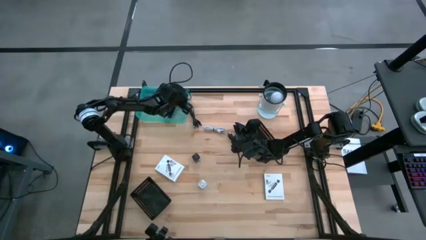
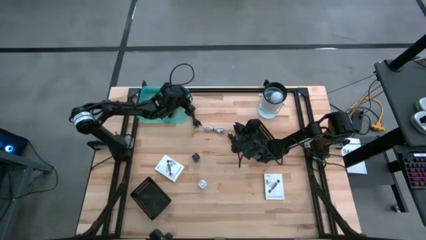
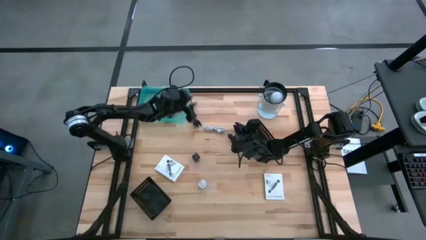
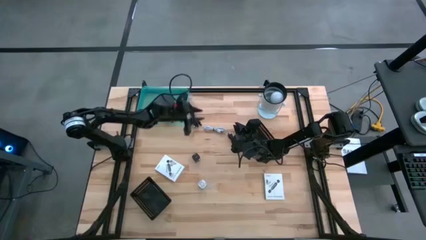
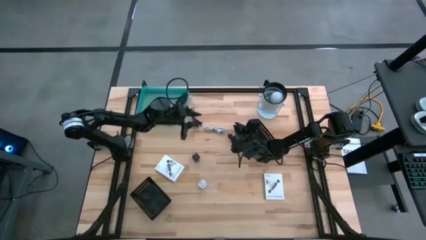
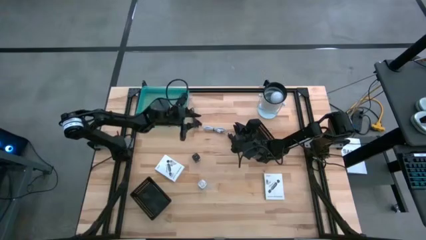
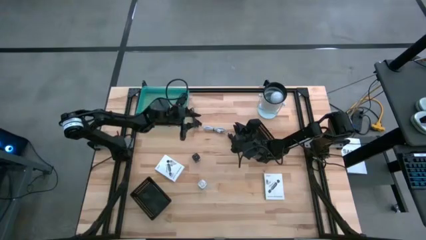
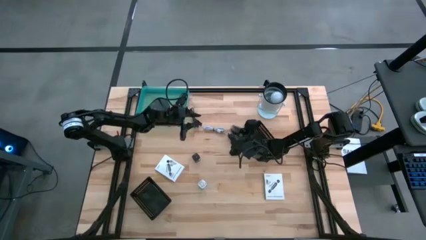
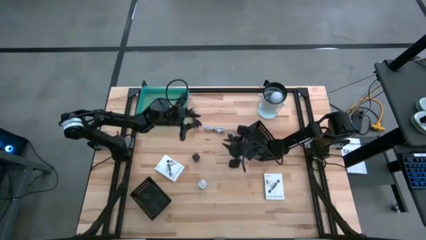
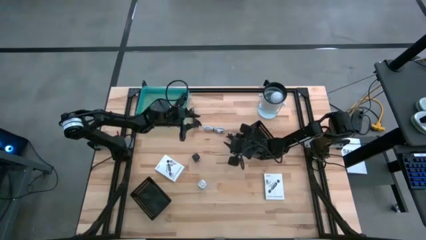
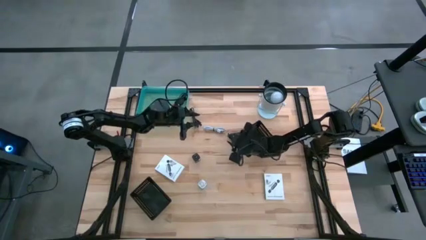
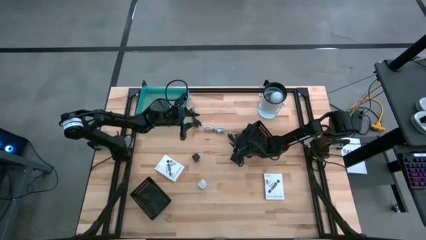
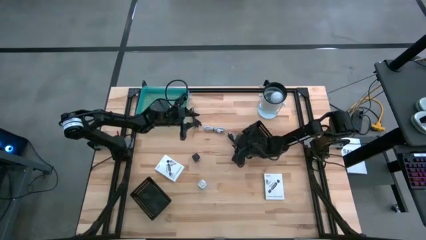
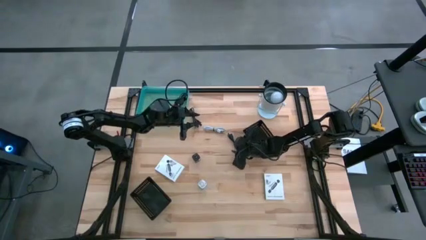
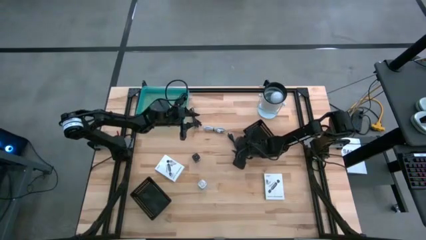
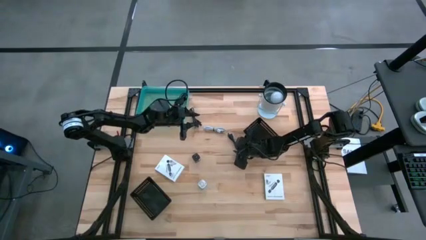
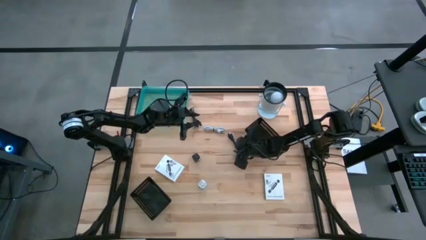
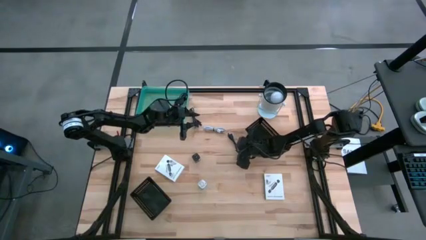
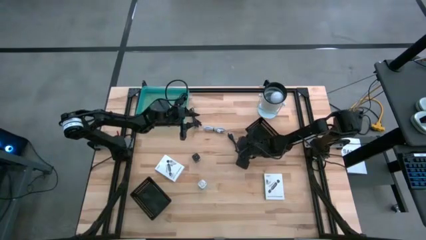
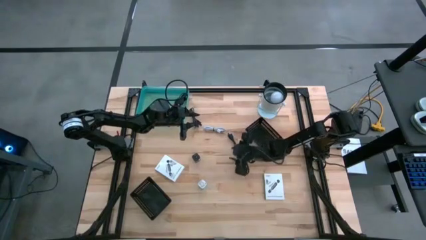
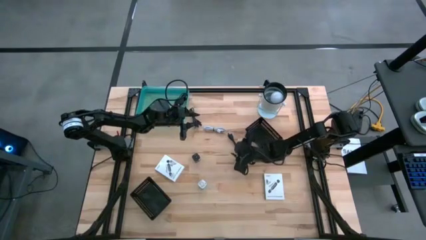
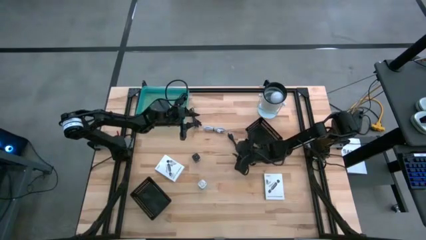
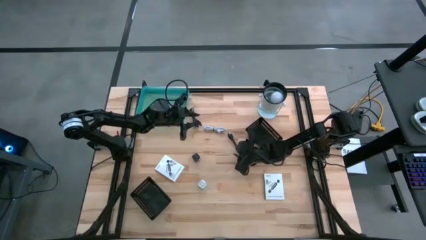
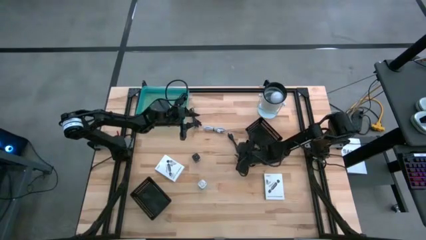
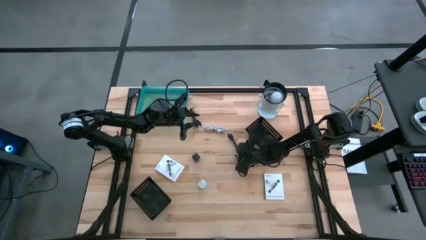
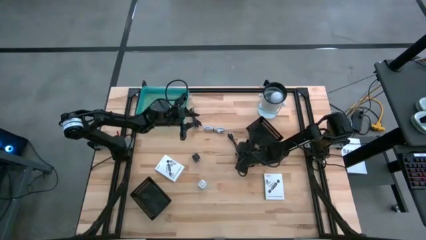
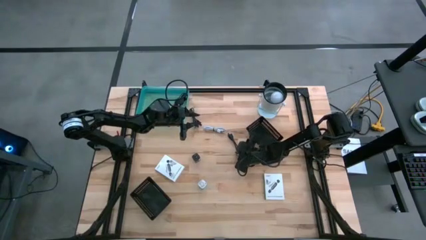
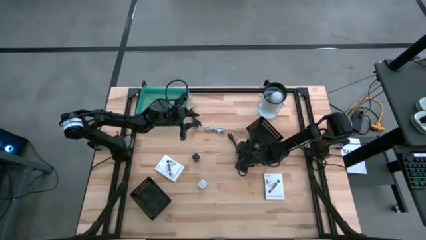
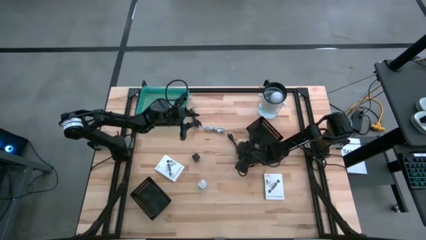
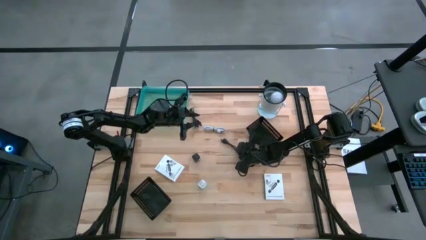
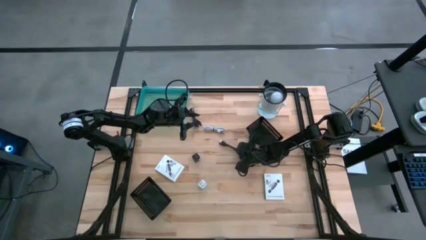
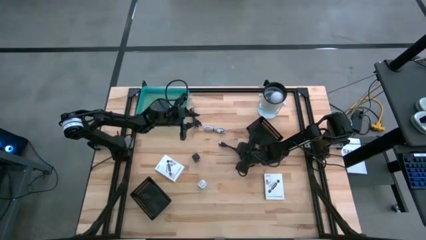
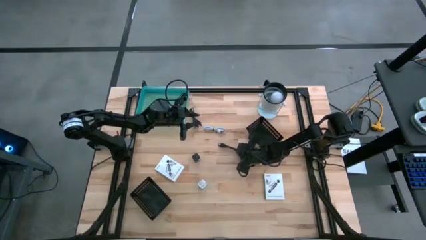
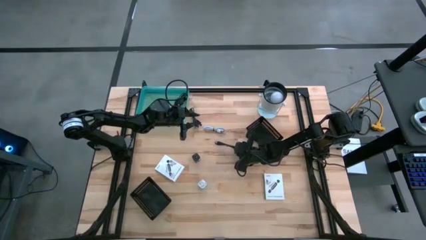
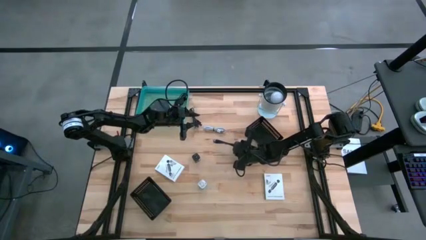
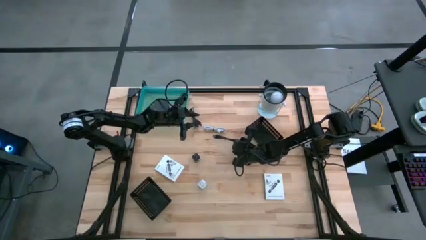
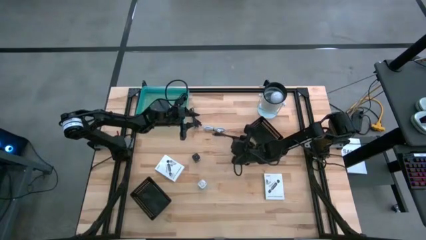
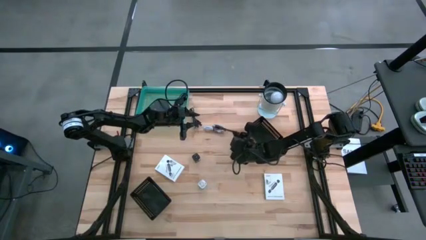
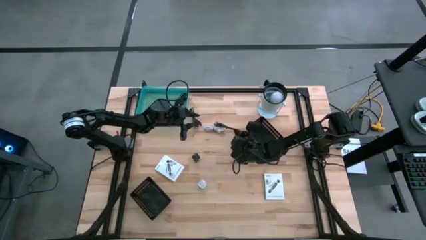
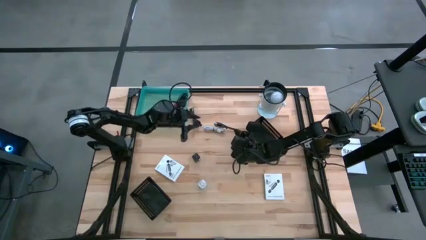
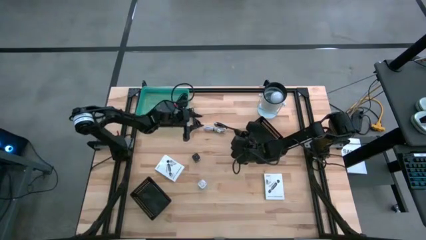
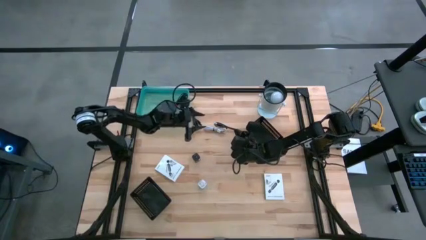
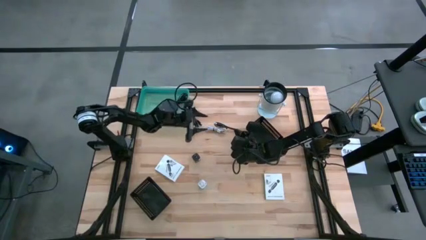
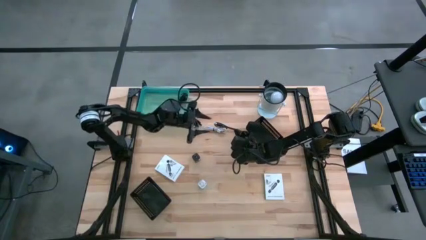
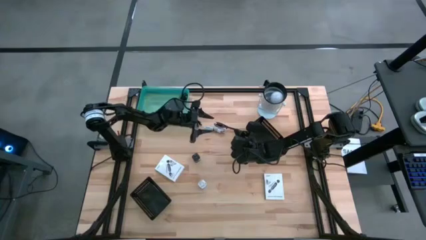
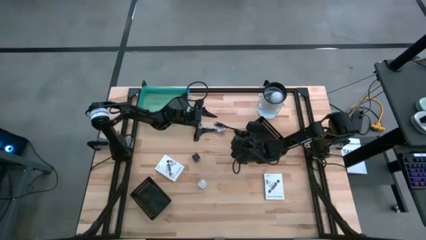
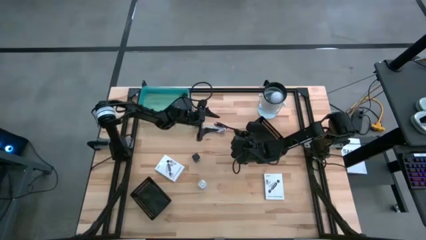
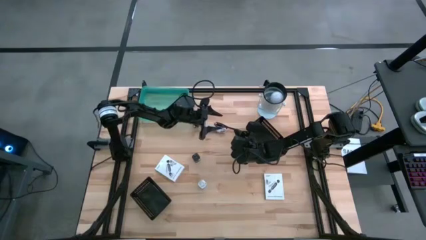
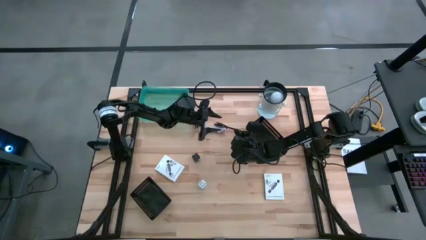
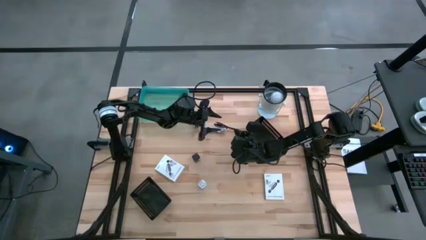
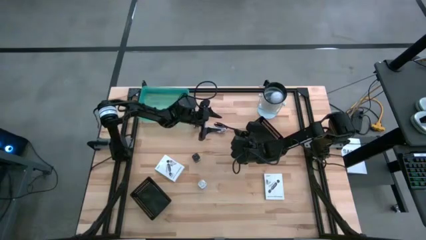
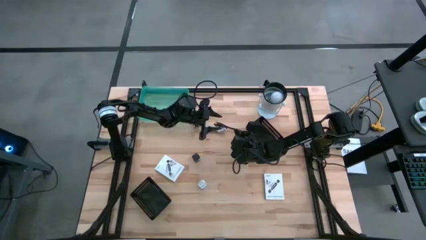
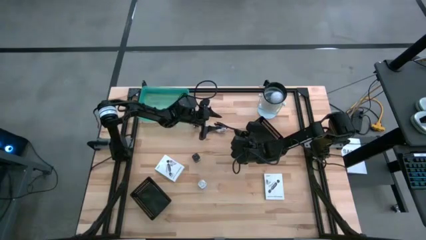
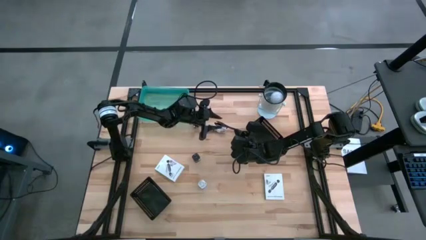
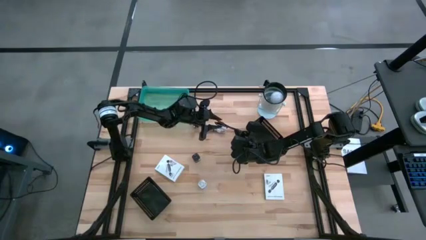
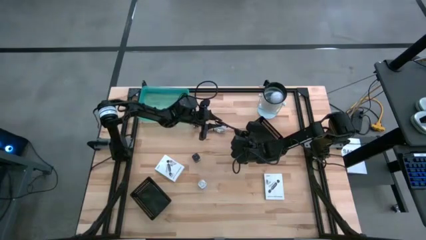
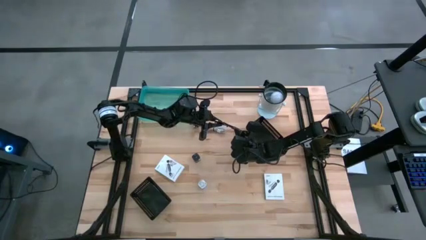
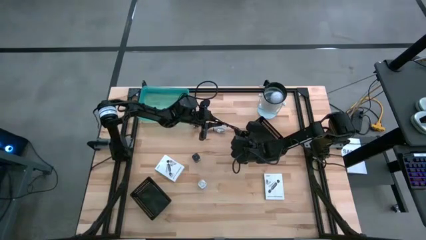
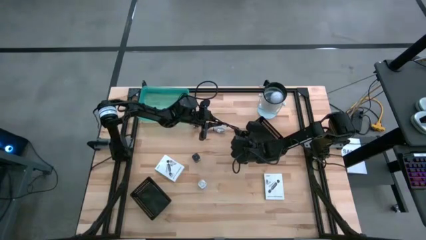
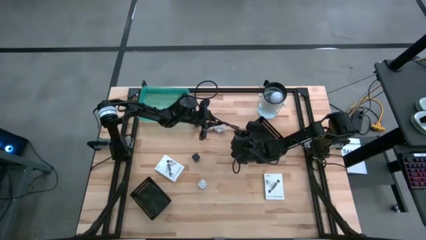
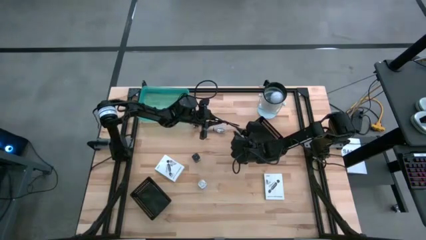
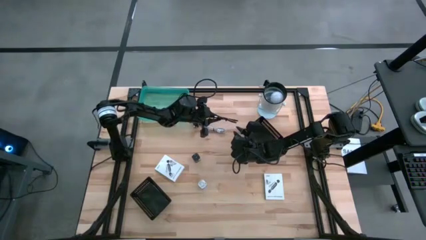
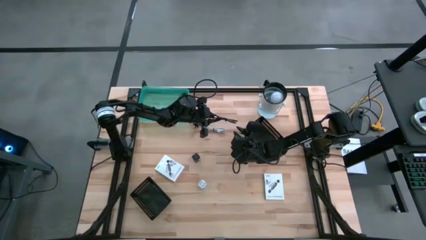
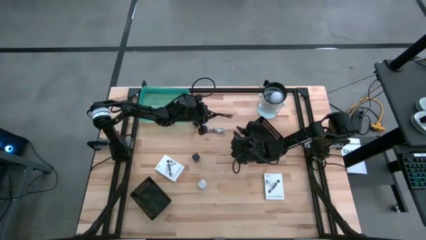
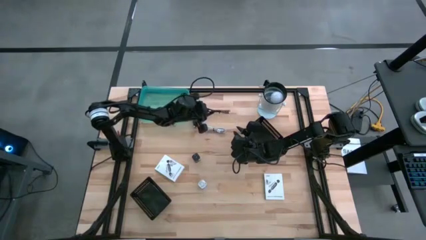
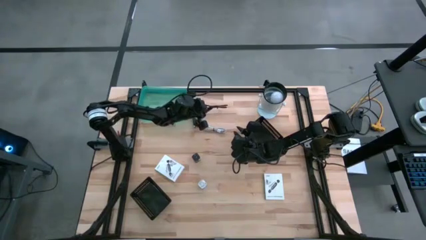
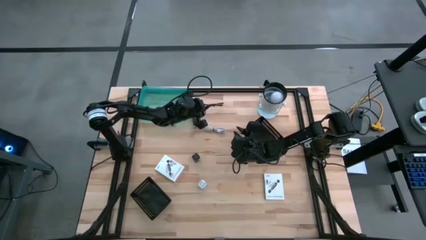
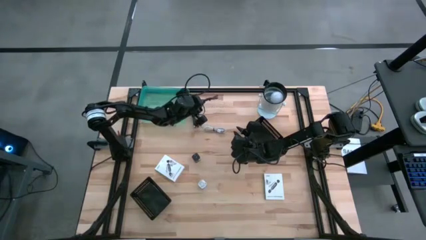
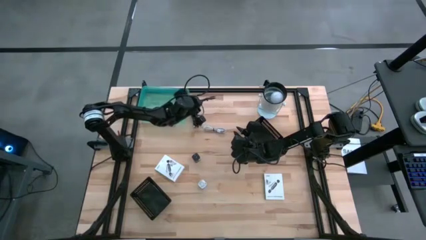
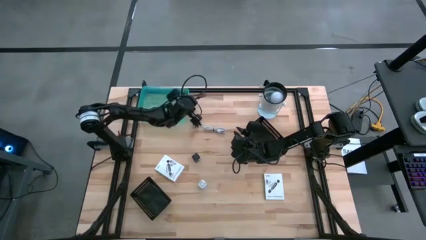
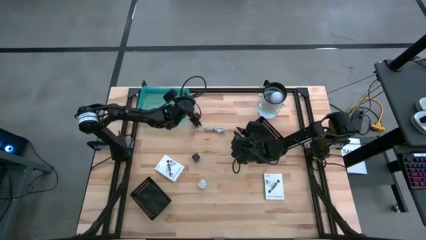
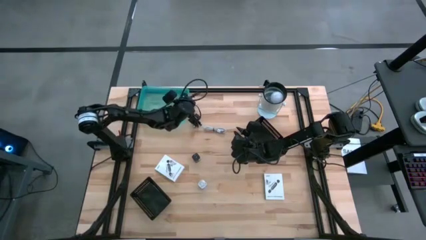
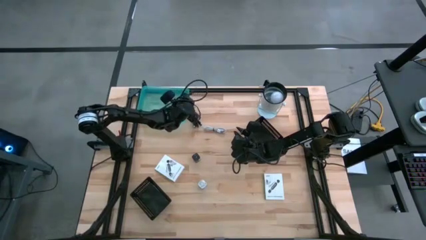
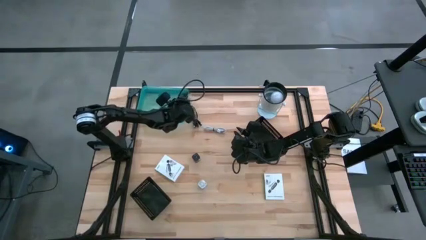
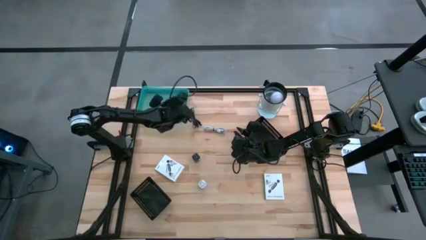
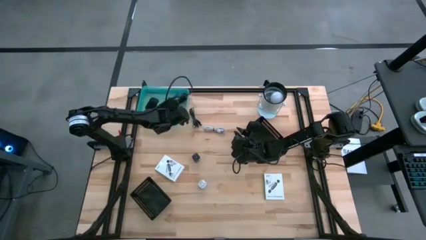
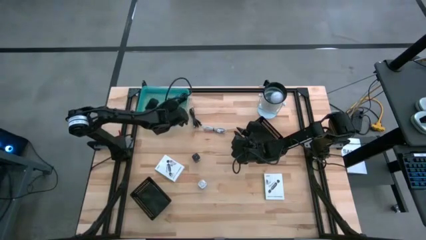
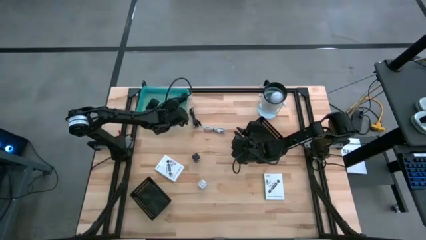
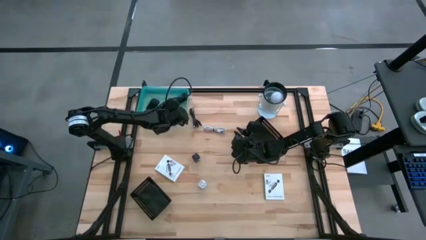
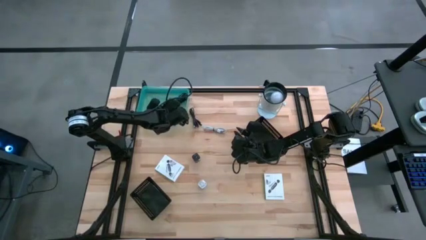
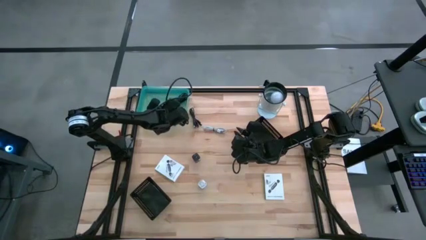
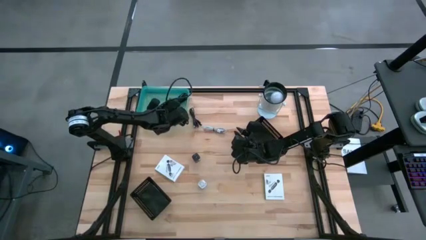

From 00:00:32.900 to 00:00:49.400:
Task: Pick and place items into bin
Put the bottom black charger cable into the green bin
